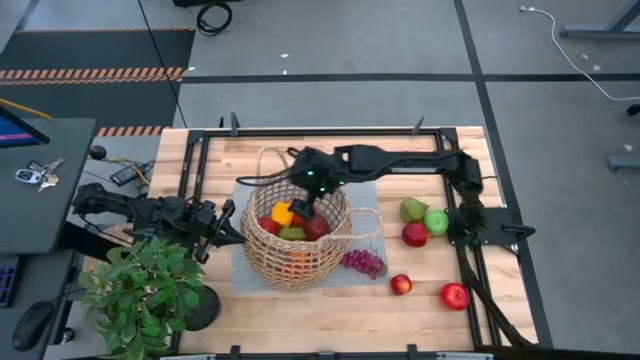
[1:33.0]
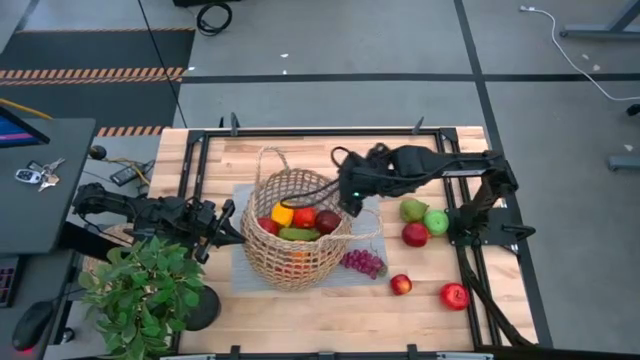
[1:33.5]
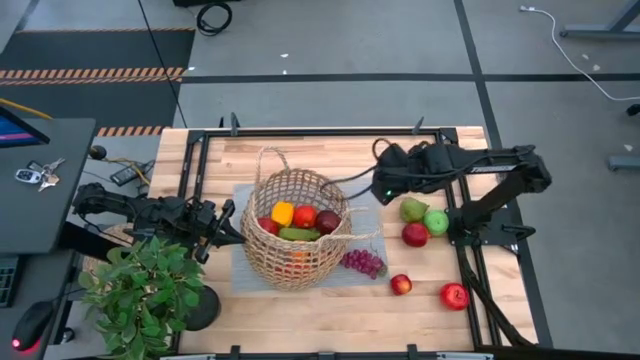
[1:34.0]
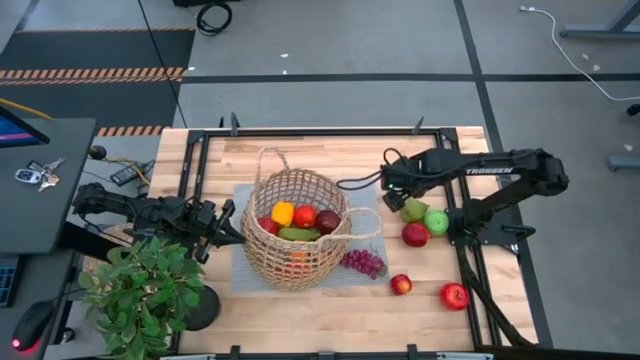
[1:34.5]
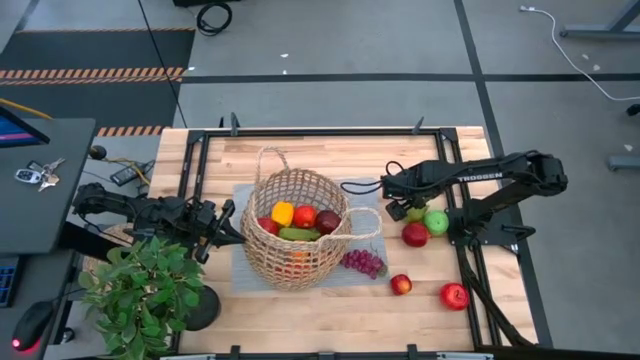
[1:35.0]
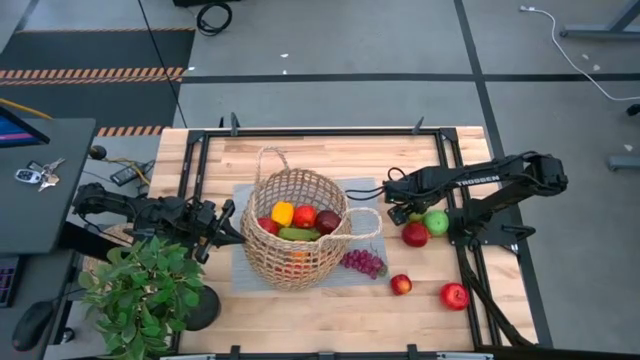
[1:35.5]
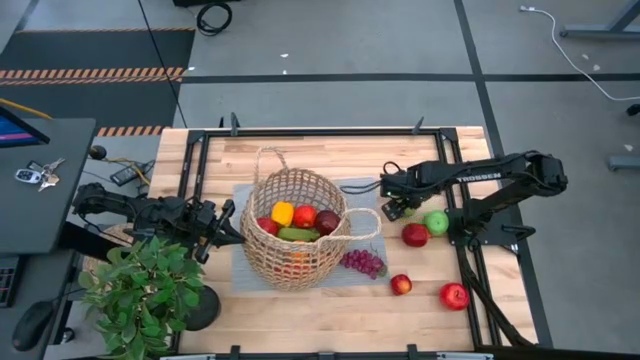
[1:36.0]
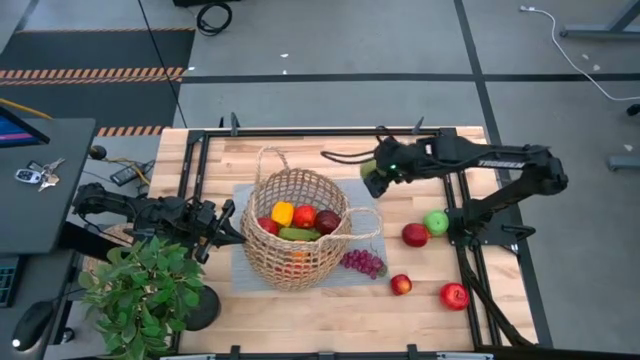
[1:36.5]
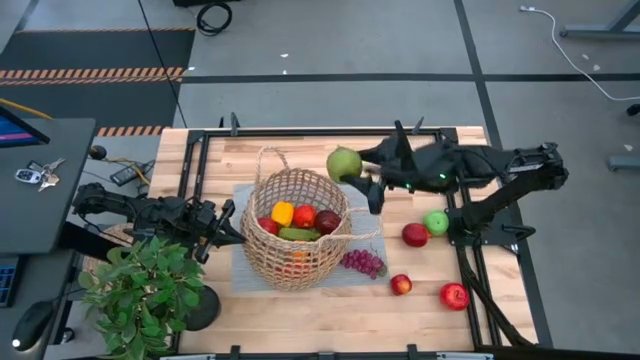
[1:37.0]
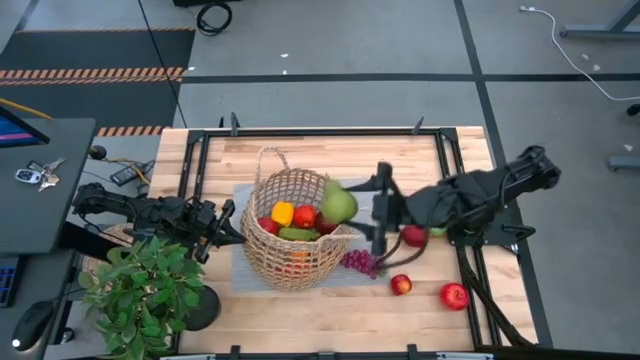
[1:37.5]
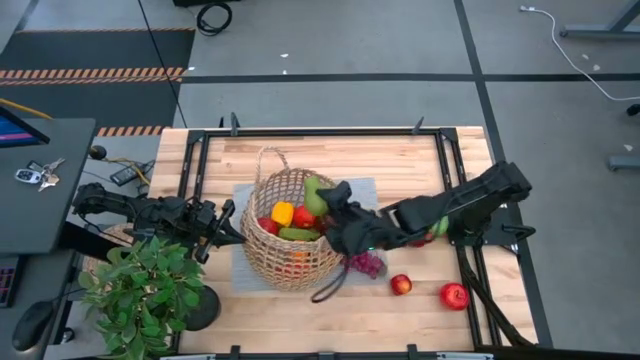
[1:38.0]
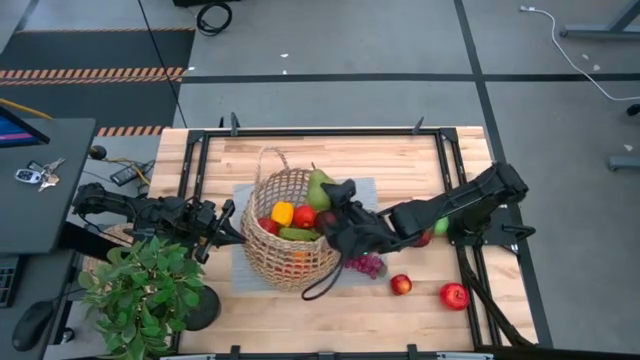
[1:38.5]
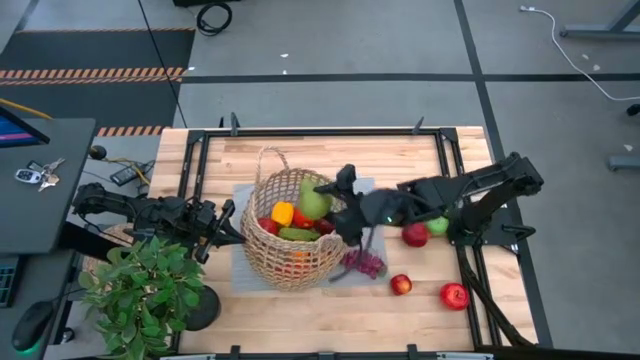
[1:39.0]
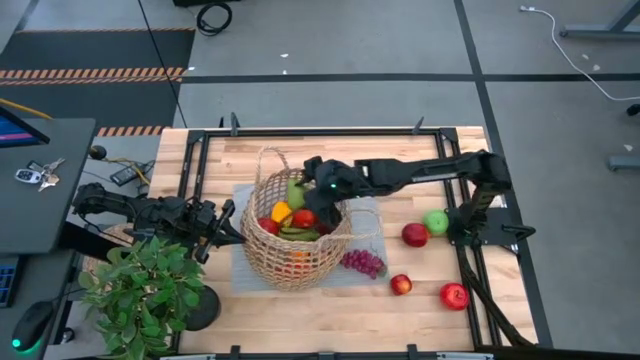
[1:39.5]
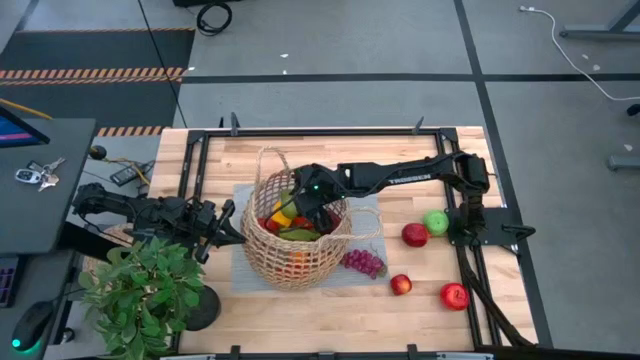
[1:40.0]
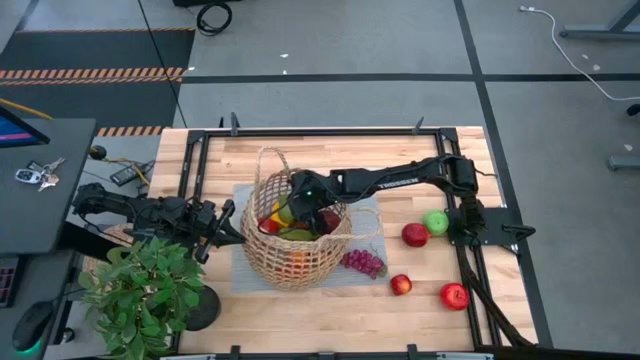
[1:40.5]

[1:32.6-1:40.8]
Task: Build produce basket
Put the green pear into the basket

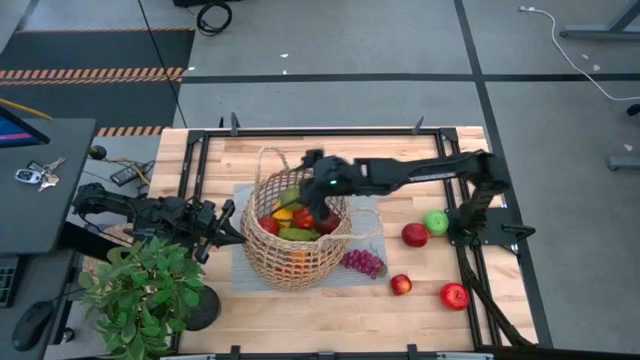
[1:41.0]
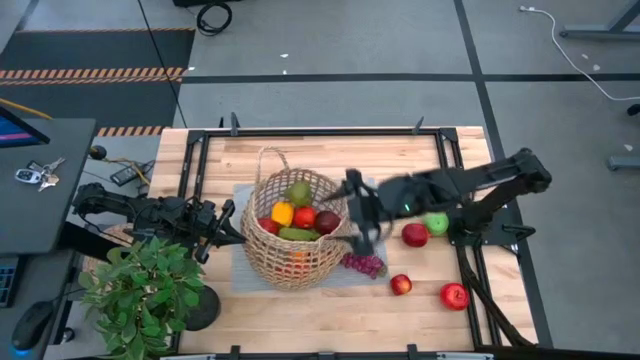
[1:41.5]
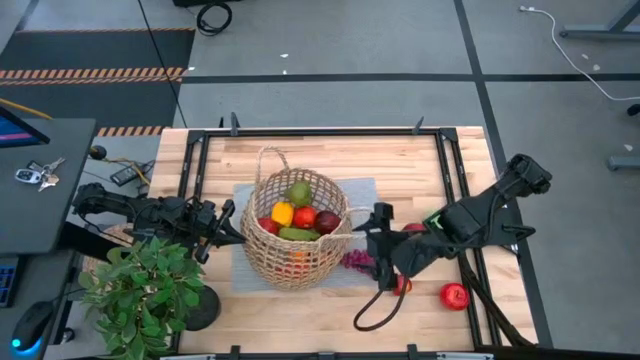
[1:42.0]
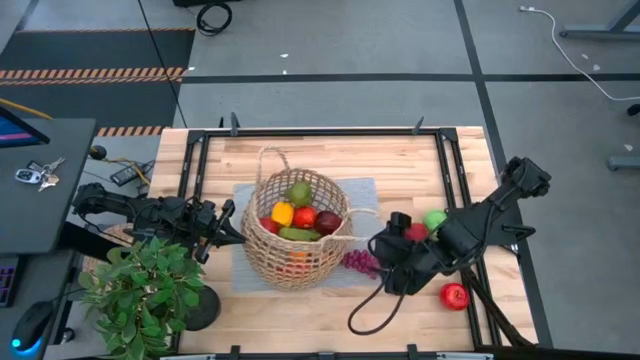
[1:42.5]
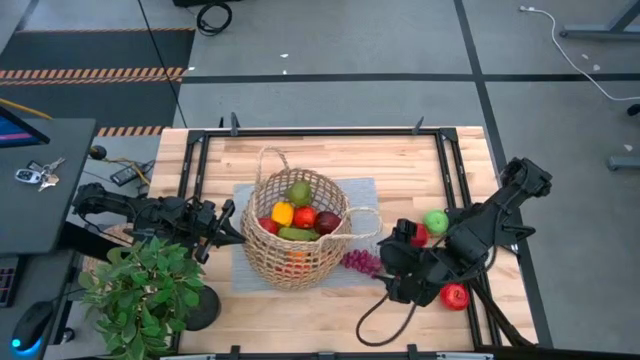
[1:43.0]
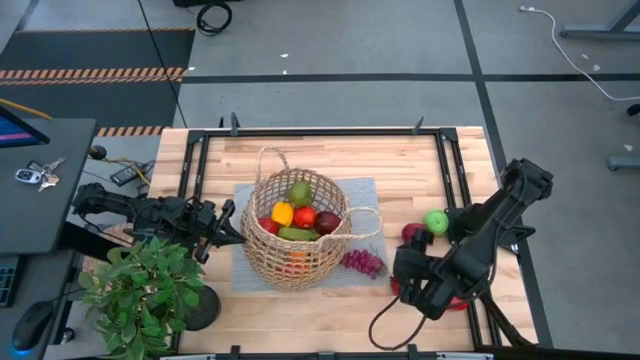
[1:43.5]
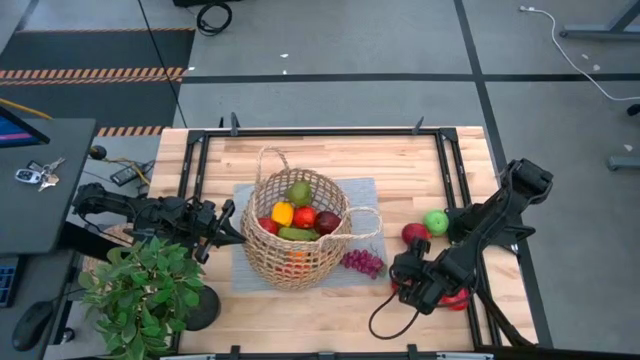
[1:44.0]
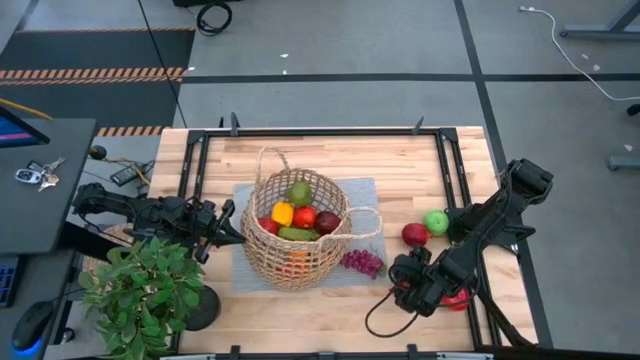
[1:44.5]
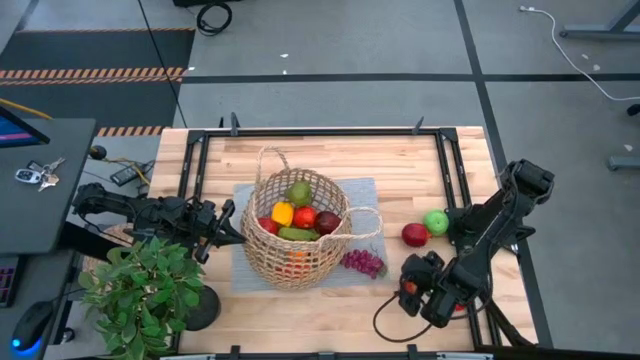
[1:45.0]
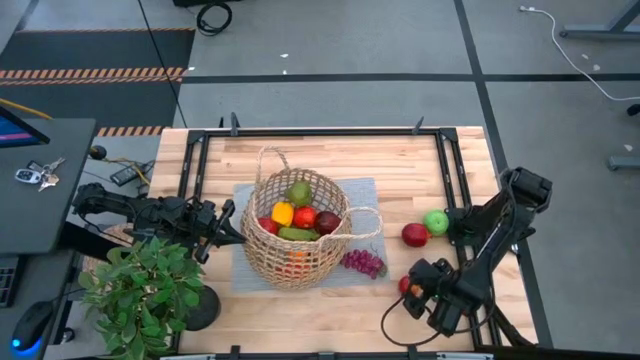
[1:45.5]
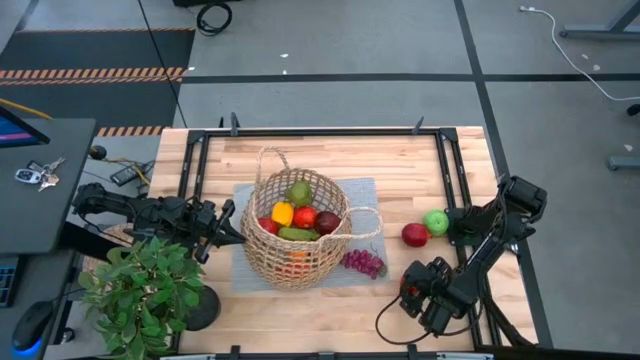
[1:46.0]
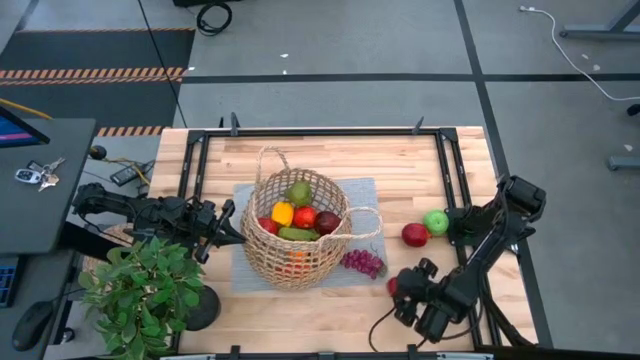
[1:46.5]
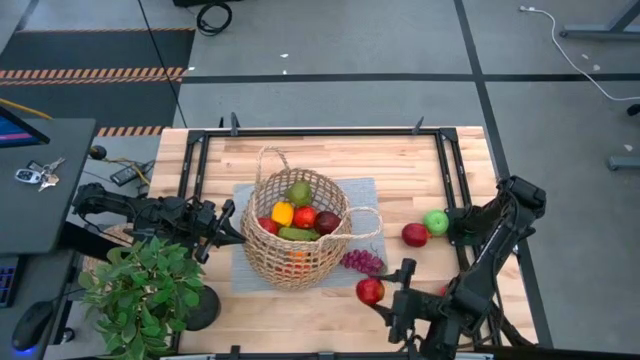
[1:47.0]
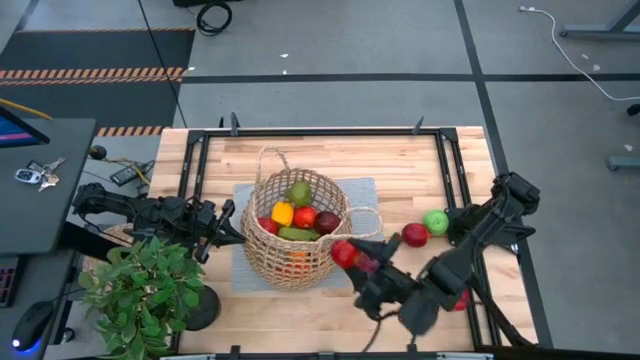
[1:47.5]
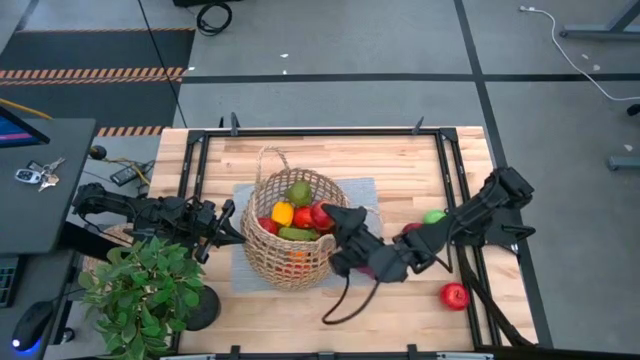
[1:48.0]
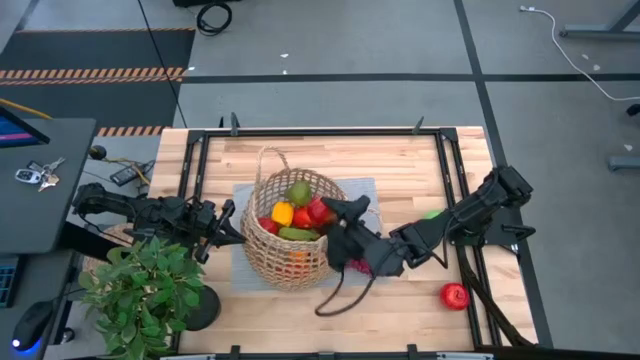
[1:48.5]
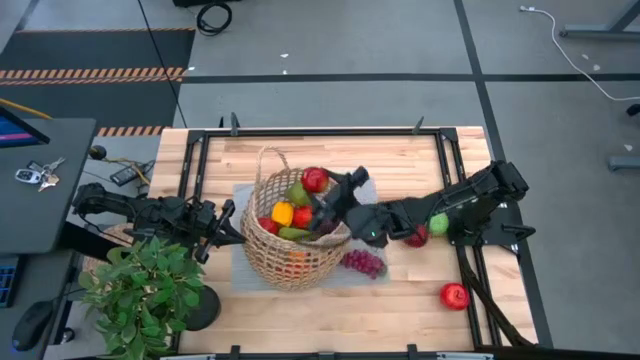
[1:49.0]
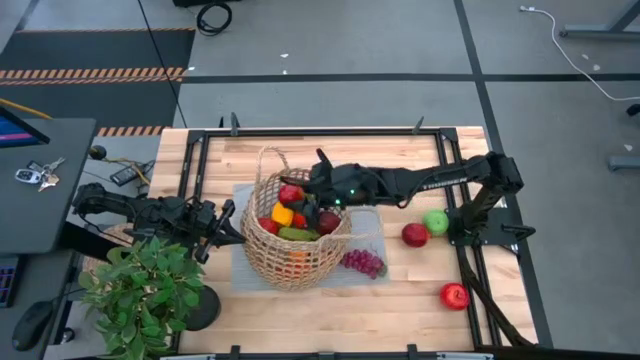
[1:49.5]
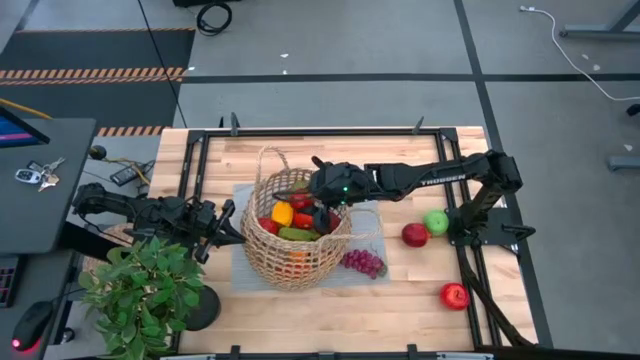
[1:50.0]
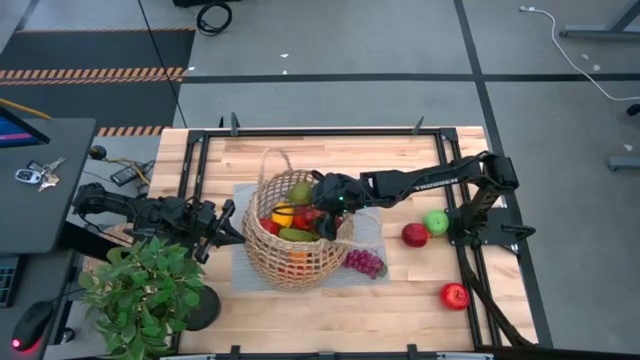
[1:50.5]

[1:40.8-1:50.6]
Put the left red apple into the basket
